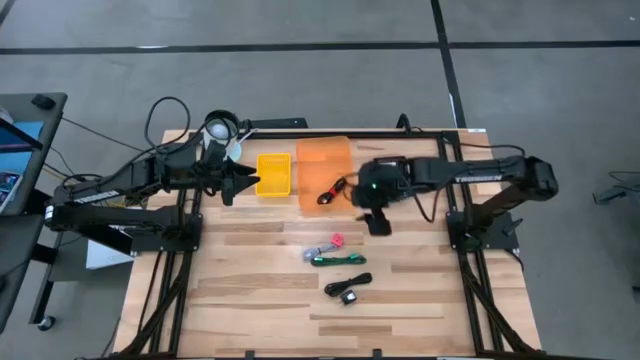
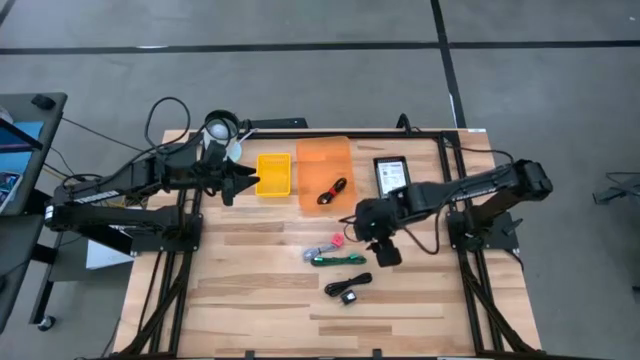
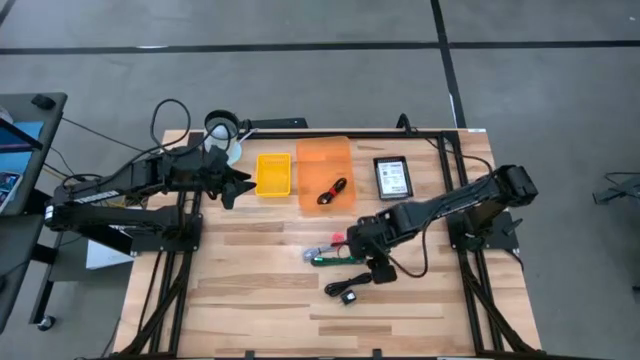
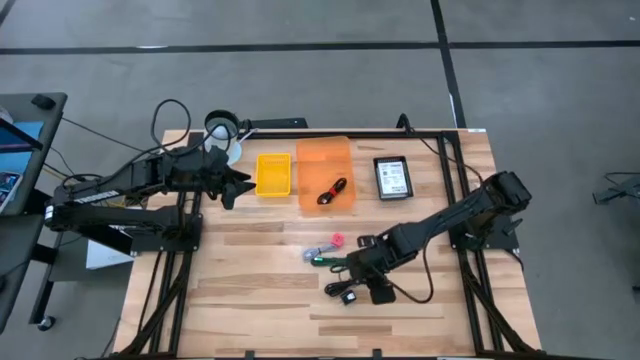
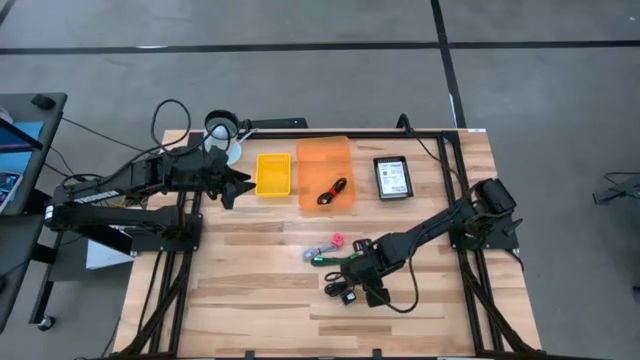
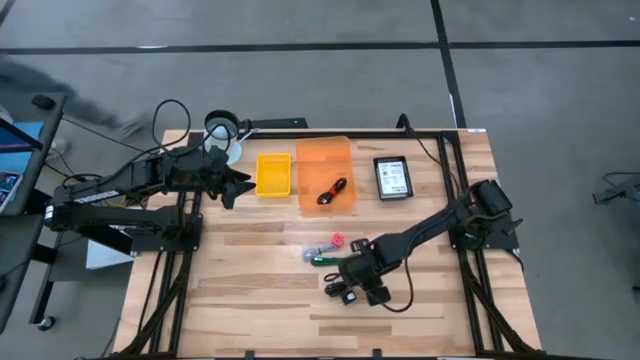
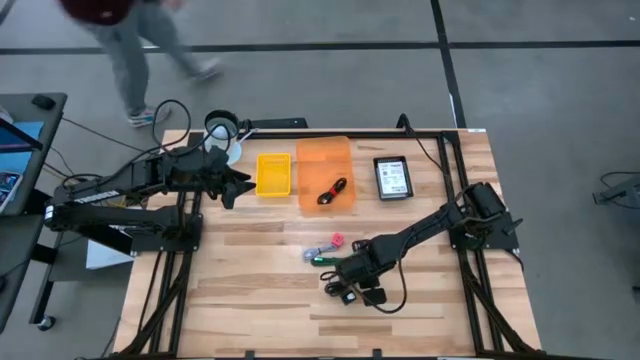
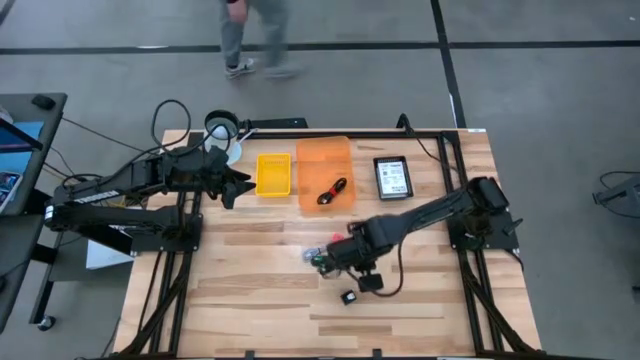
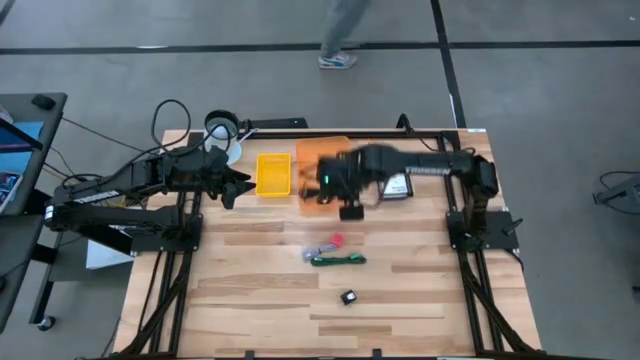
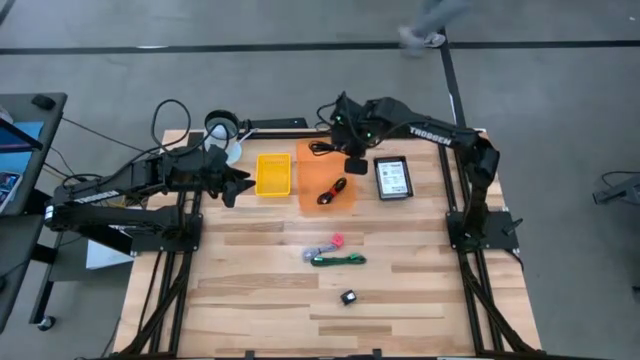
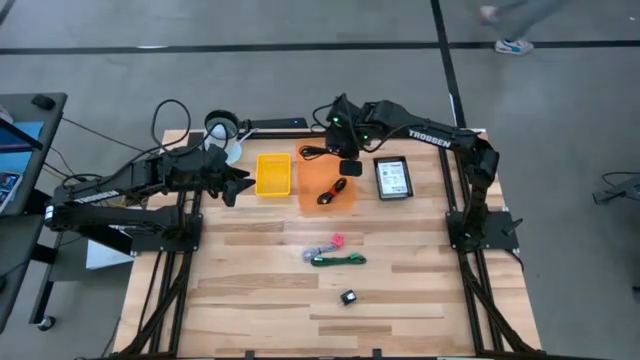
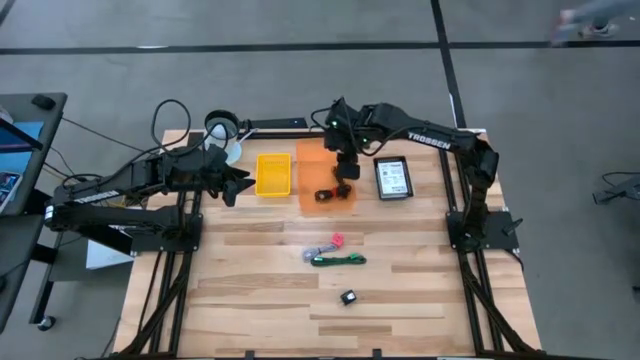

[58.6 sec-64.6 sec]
Task: Pick and place items into bin
Put the black USB cable into the orange bin

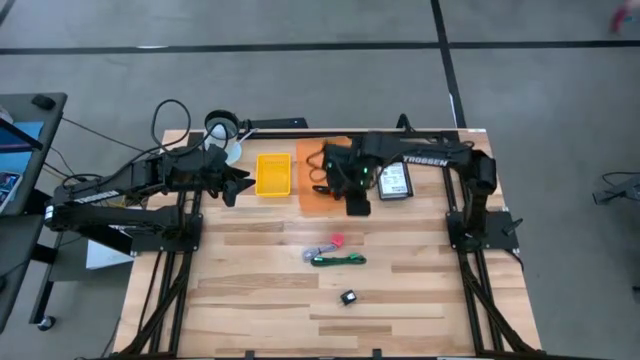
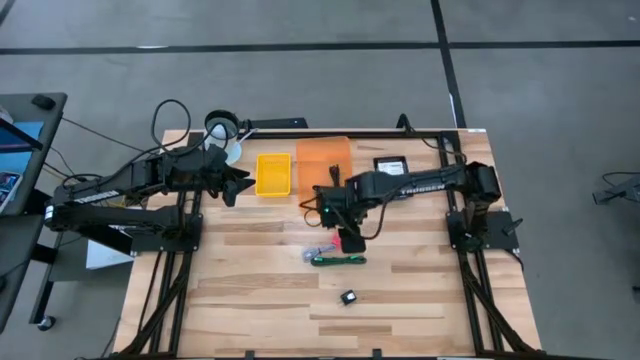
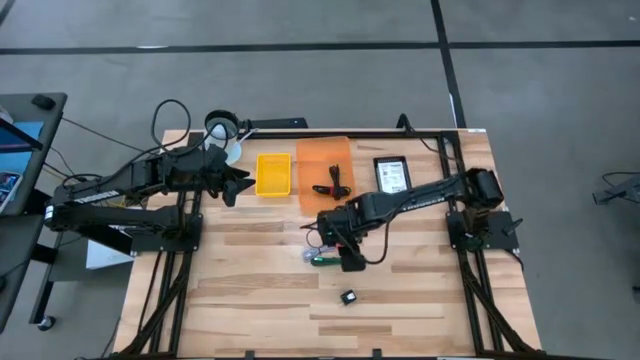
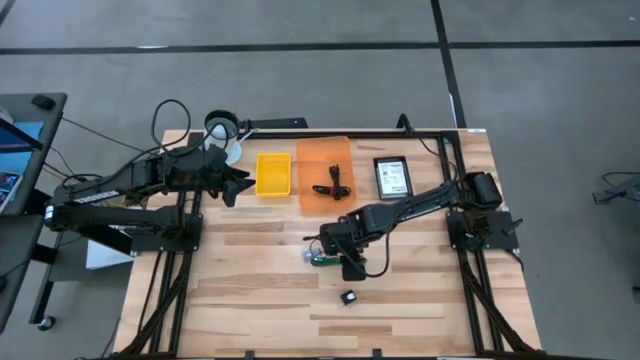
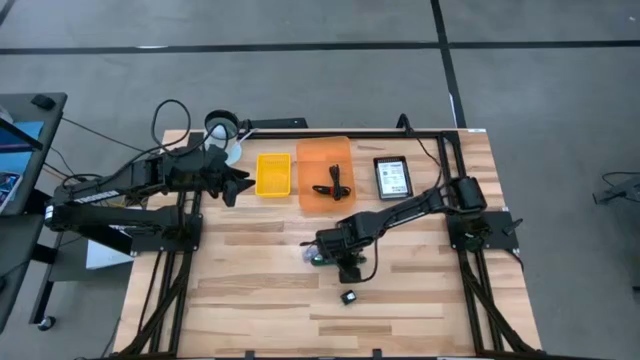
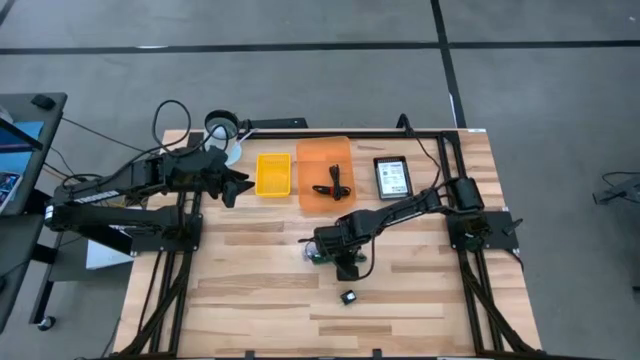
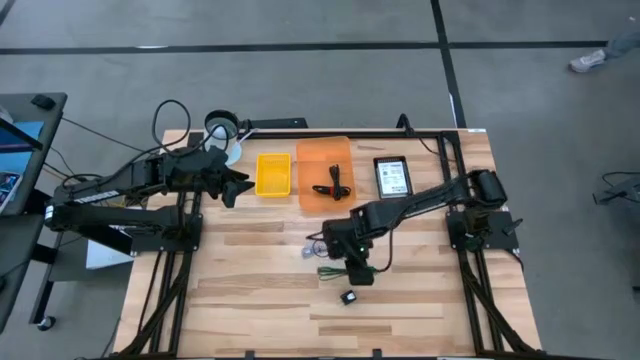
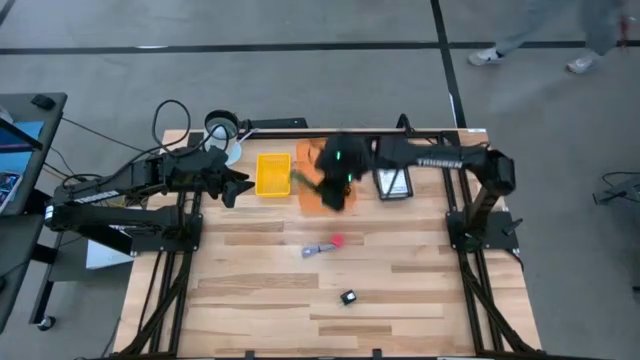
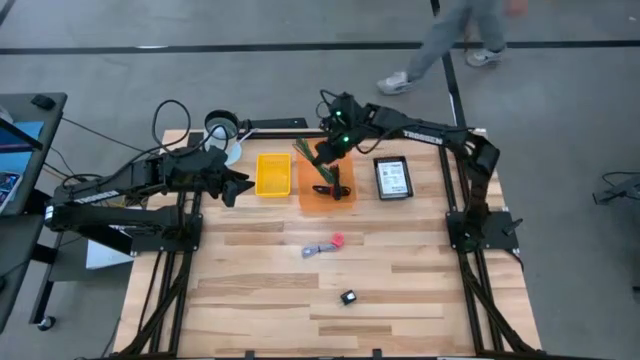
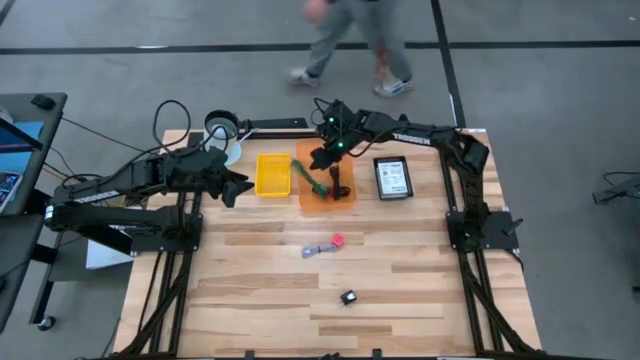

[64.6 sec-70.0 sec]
Put the green USB cable into the orange bin

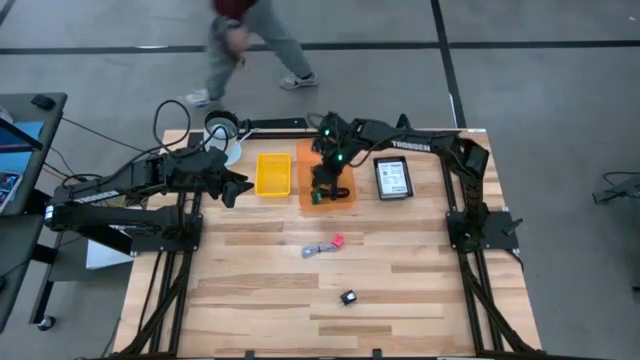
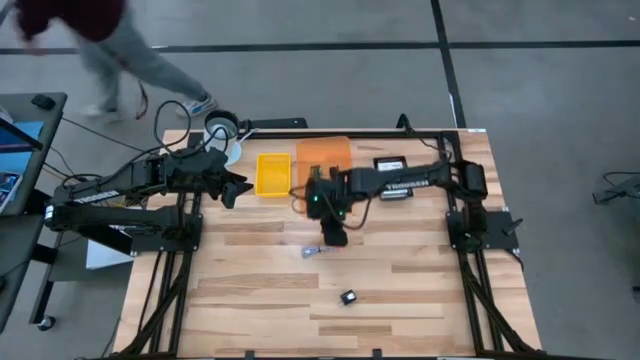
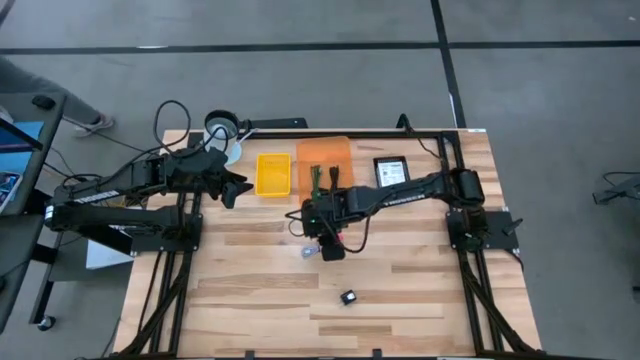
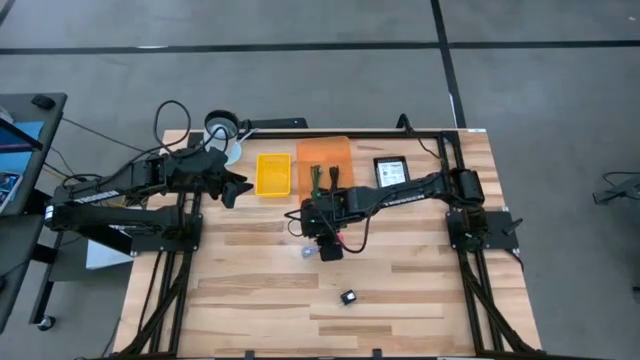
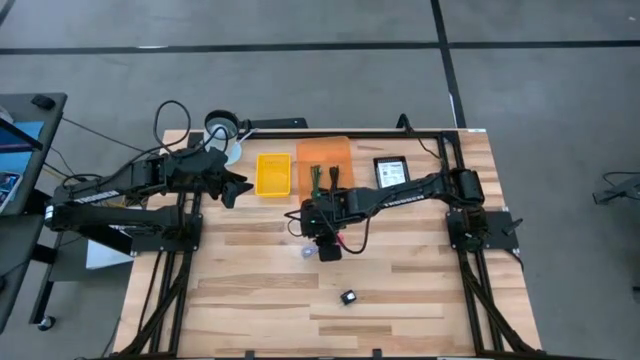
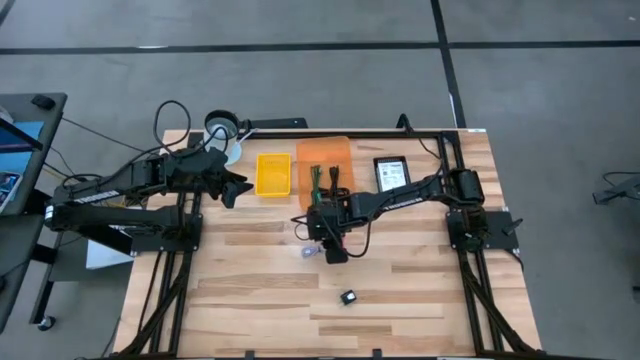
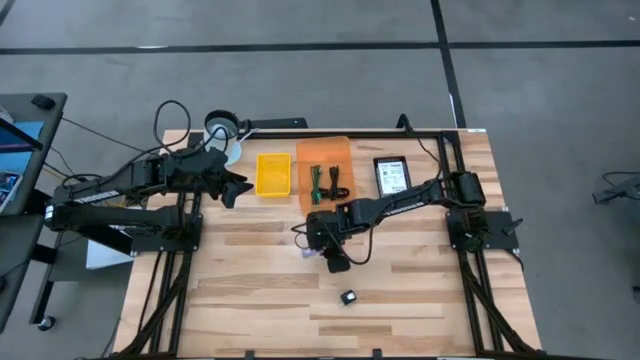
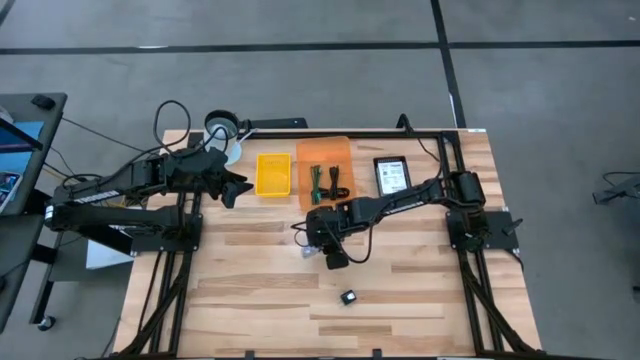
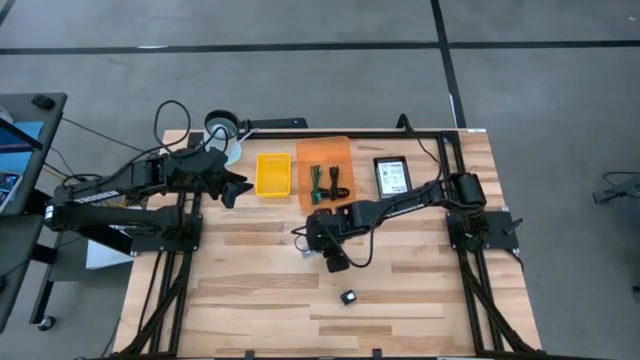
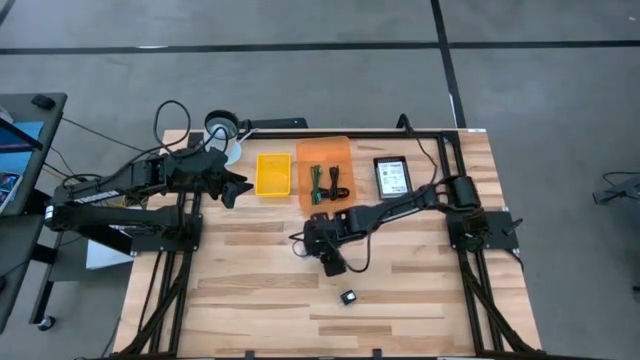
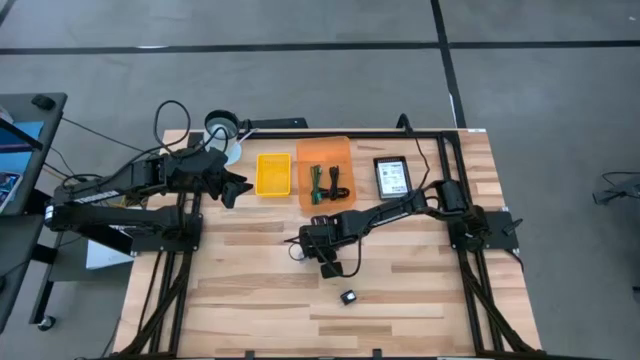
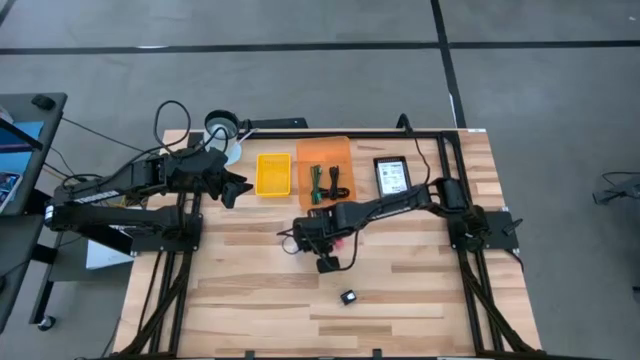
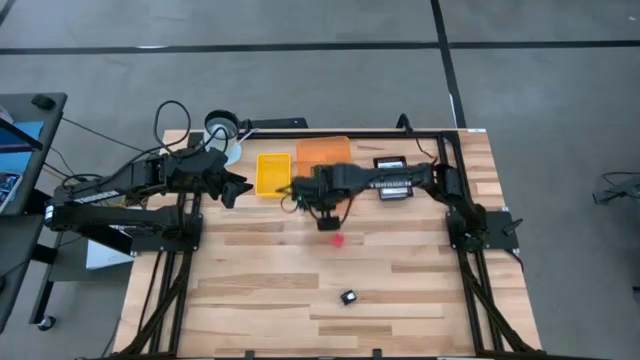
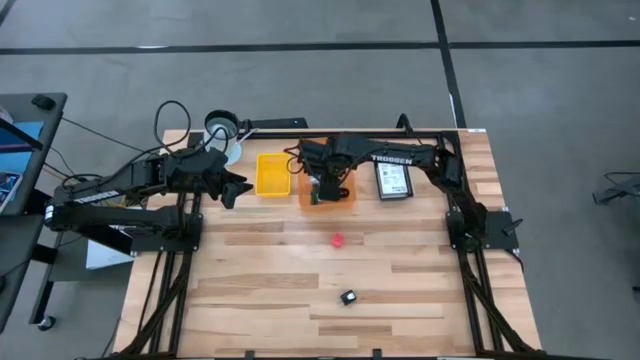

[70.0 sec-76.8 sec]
Put the white USB cable into the orange bin

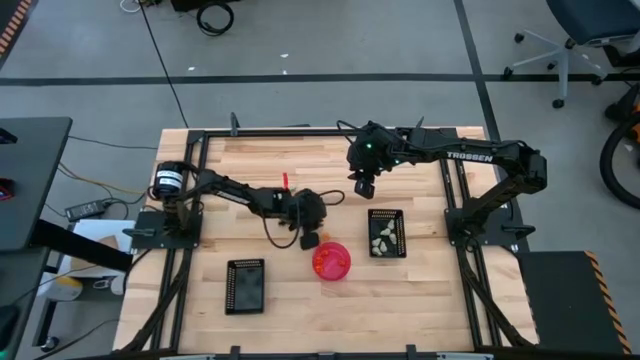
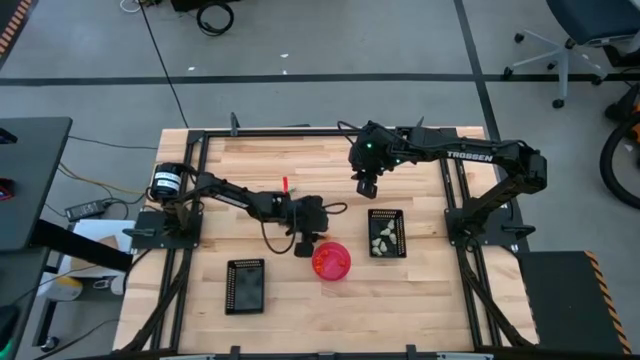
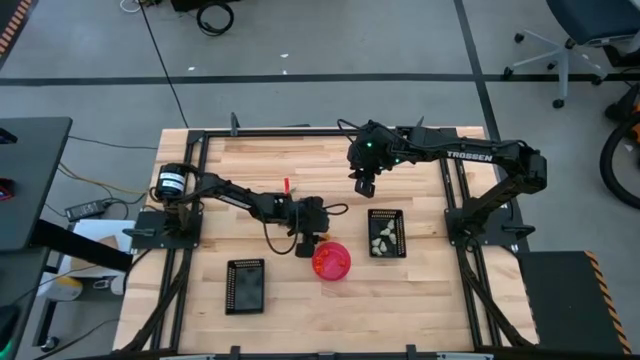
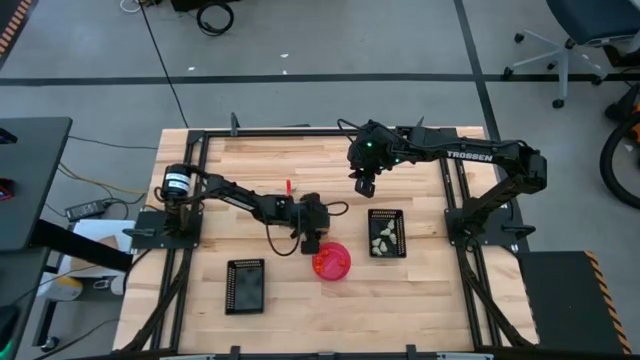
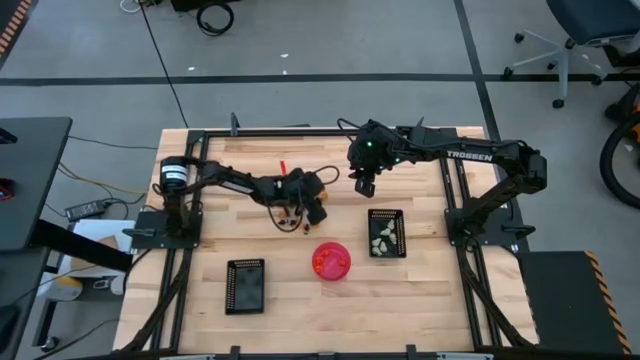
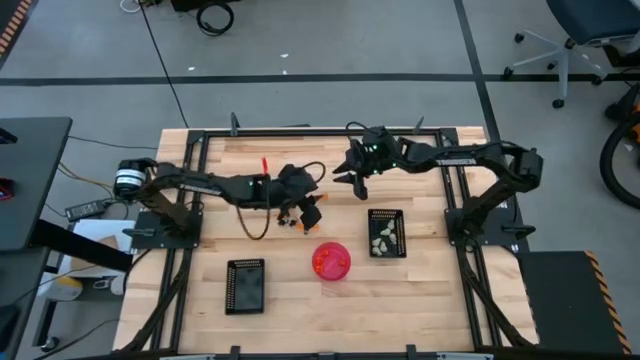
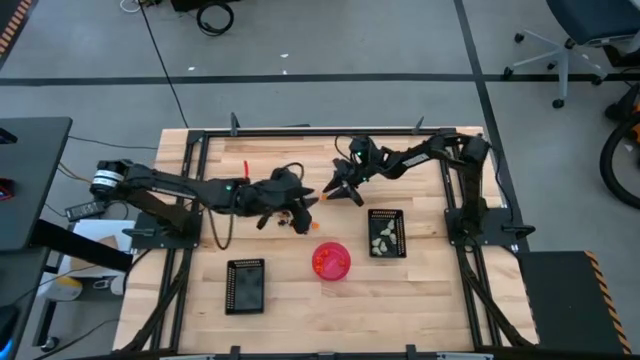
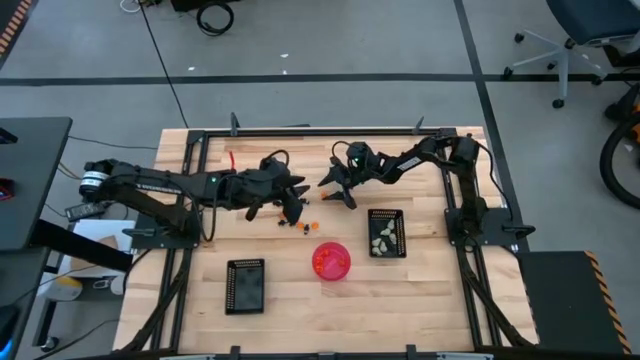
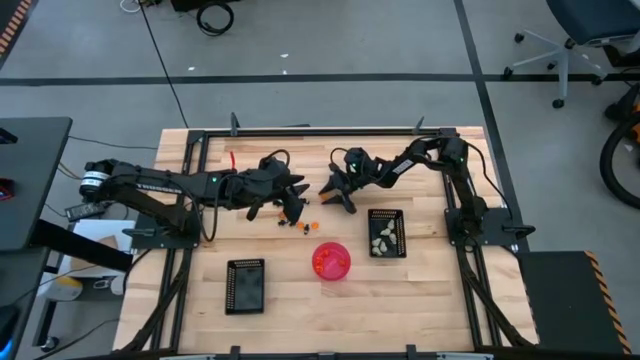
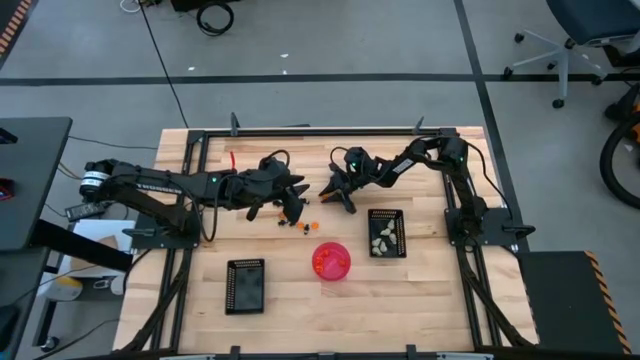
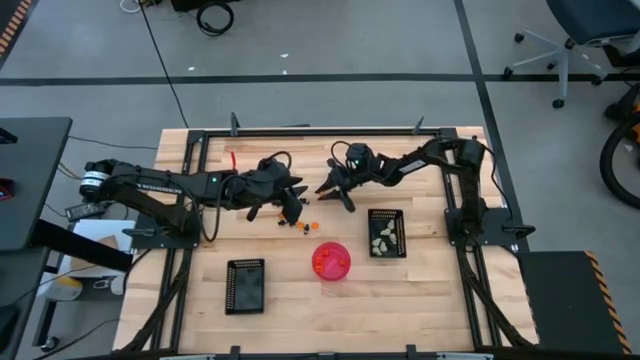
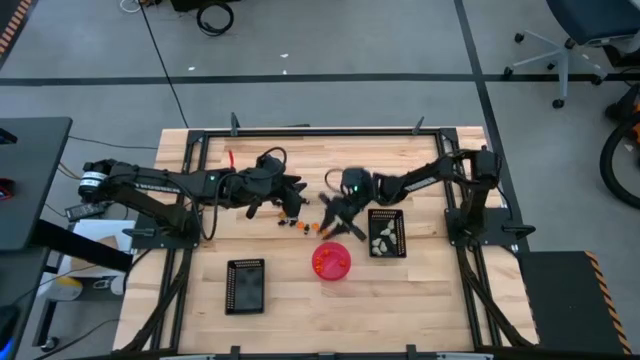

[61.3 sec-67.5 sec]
Task: Sort Halloween decoration
Put the orange pumpkin toy into the pink bowl
